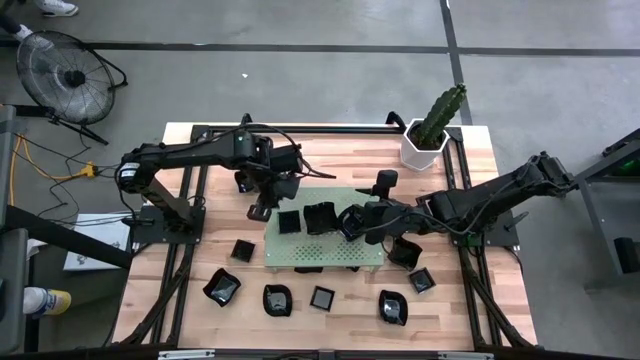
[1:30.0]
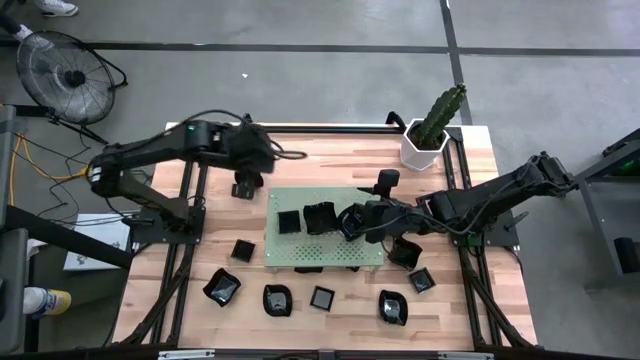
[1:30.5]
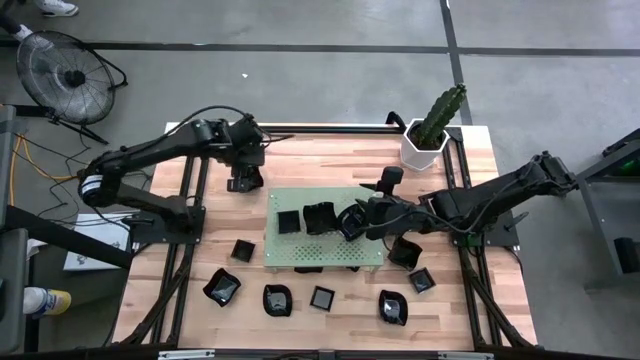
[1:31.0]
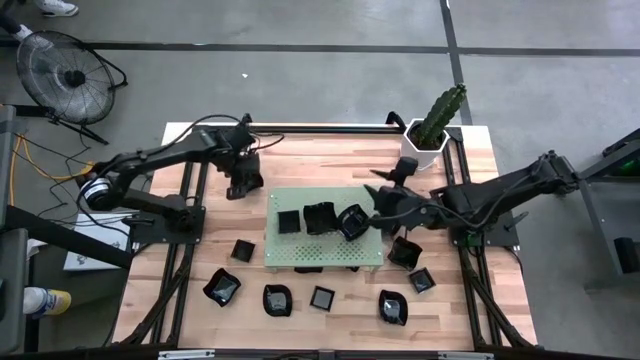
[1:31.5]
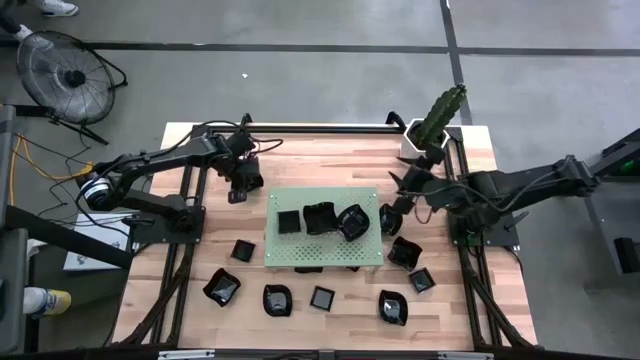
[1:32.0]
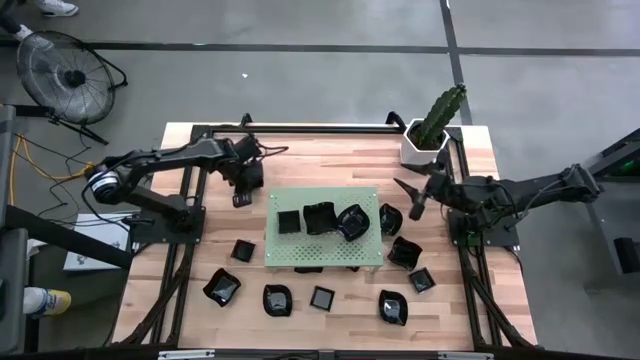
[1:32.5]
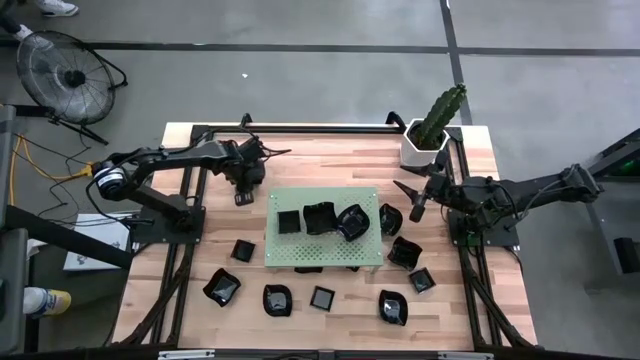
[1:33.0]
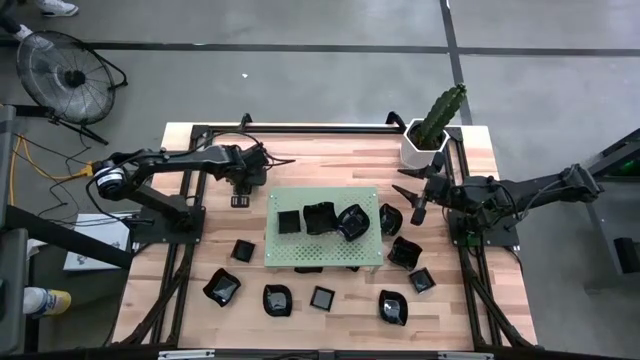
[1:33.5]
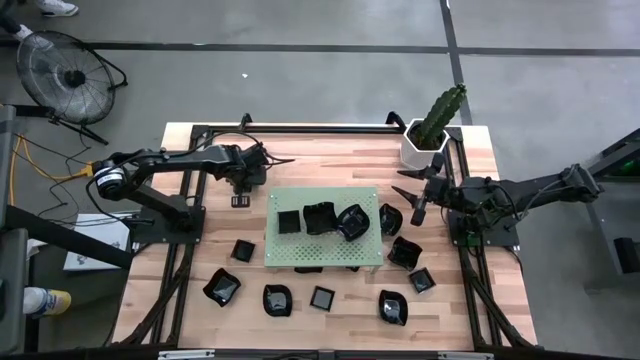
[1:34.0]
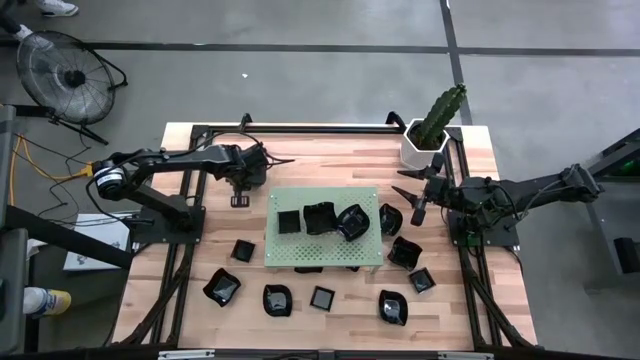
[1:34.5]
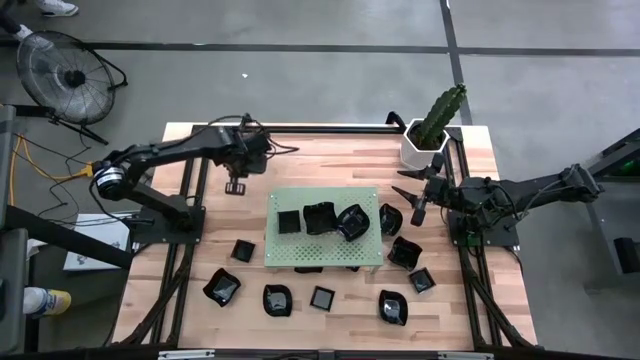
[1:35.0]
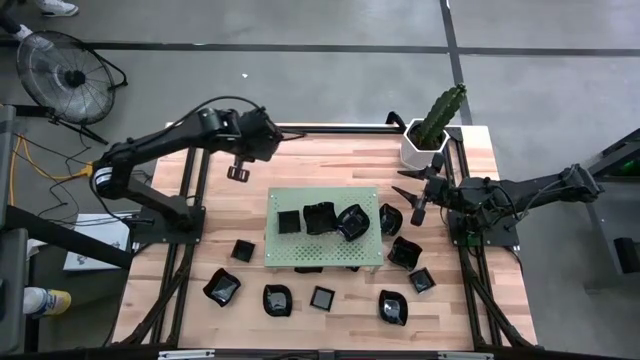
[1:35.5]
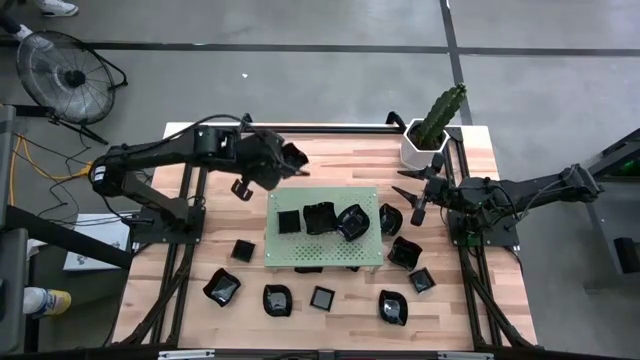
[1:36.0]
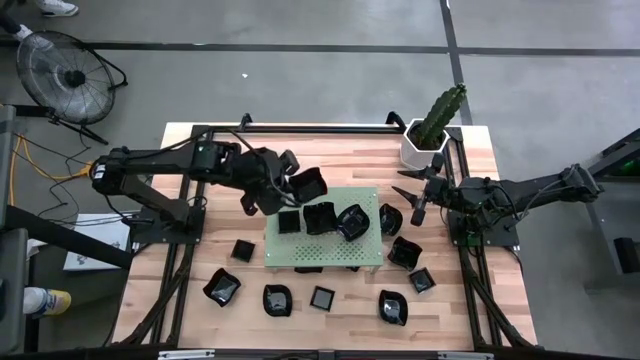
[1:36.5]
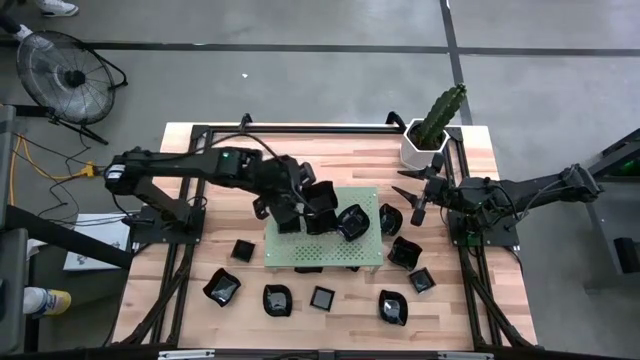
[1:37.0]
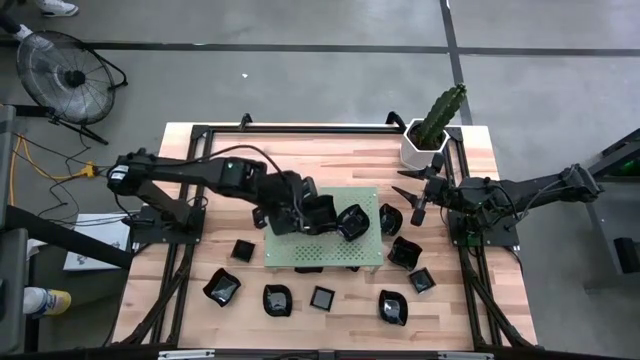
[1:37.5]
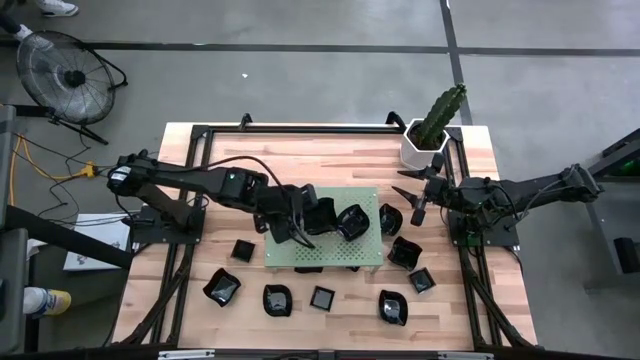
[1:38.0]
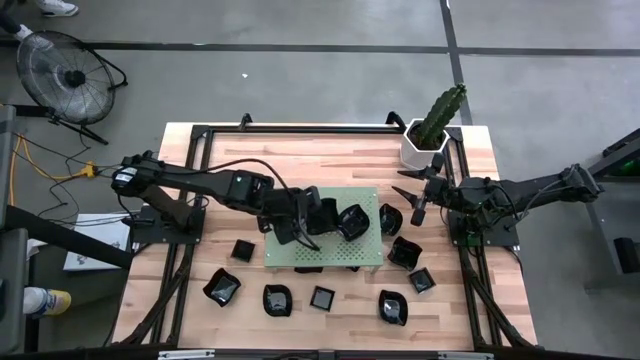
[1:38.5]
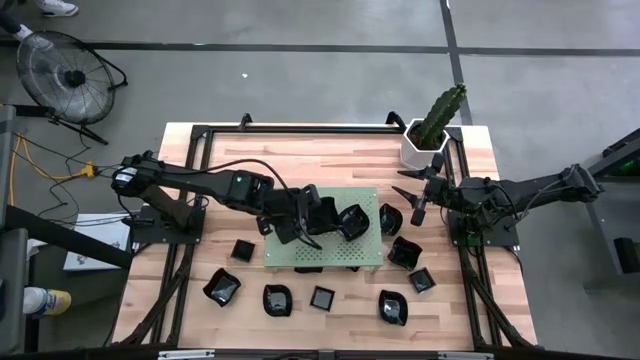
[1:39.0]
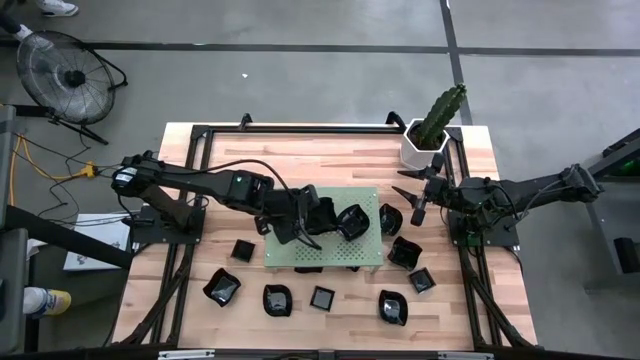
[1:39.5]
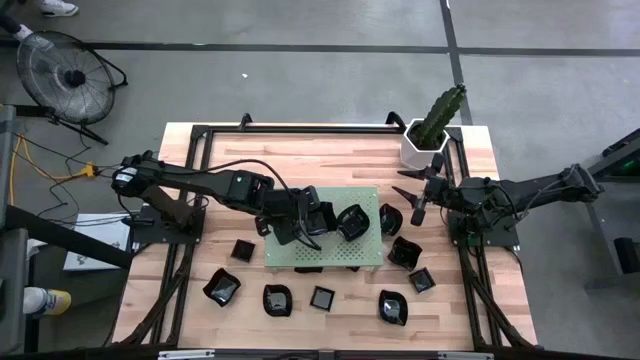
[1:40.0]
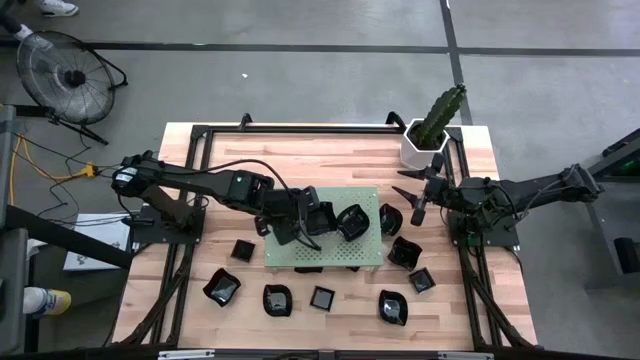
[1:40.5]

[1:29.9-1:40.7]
Task: Pick & Place Mini shaped plates
Stack the black wave square shaped bowl on top of the black wave square shaped bowl on the shelf

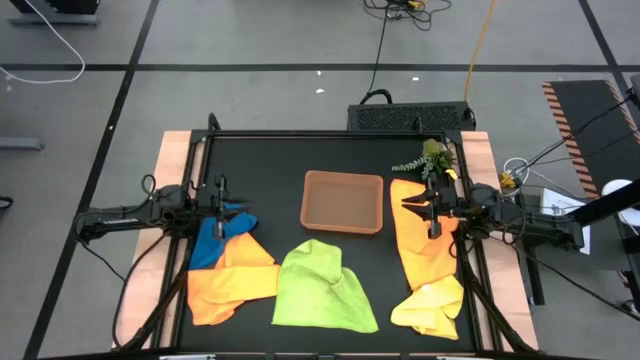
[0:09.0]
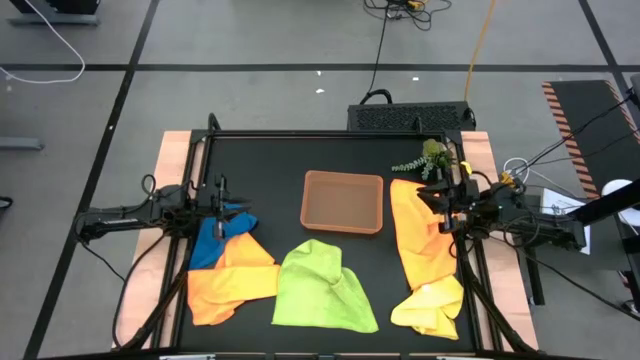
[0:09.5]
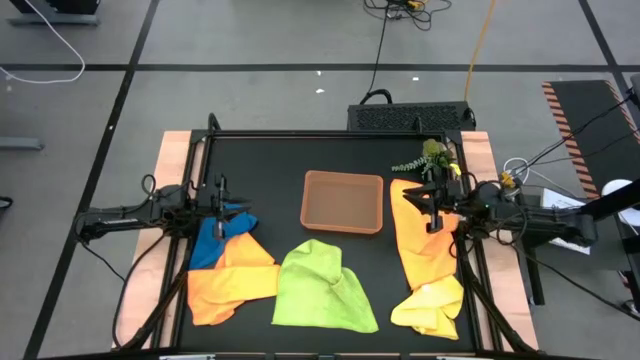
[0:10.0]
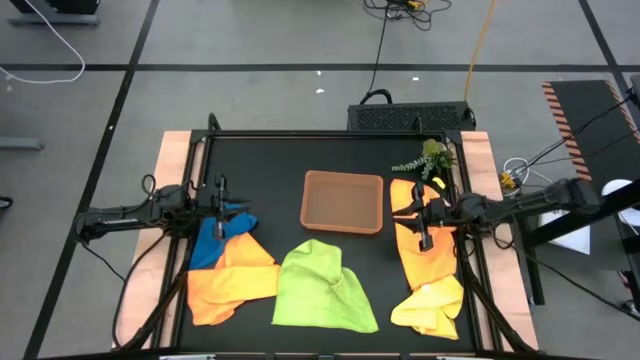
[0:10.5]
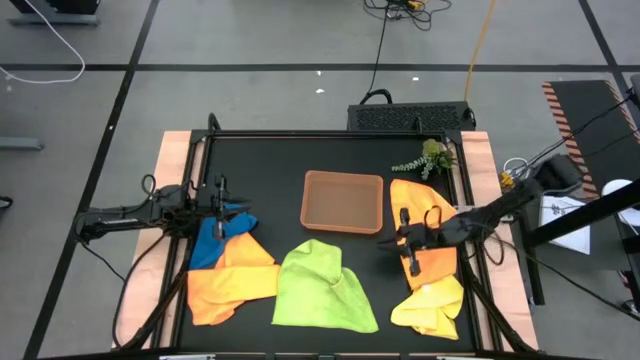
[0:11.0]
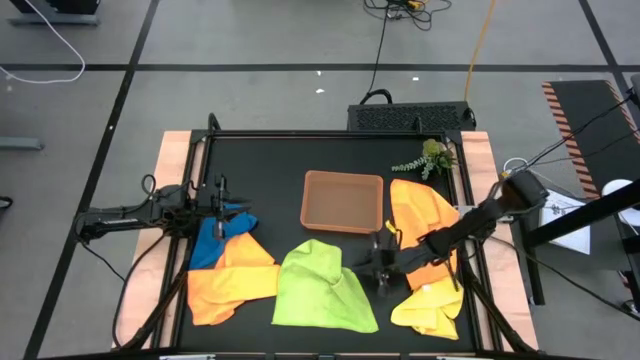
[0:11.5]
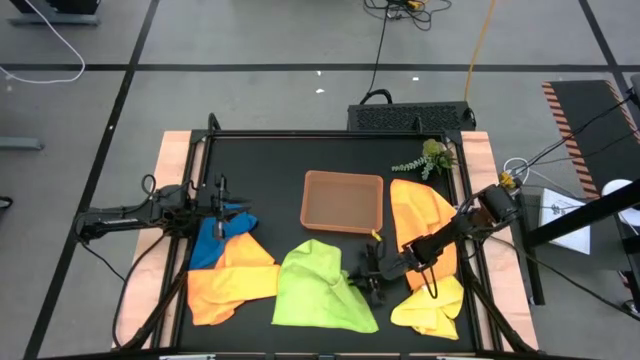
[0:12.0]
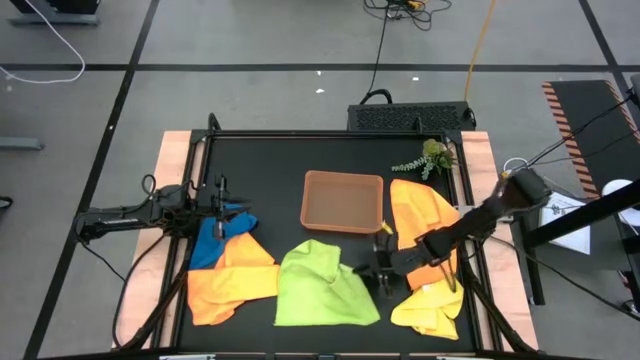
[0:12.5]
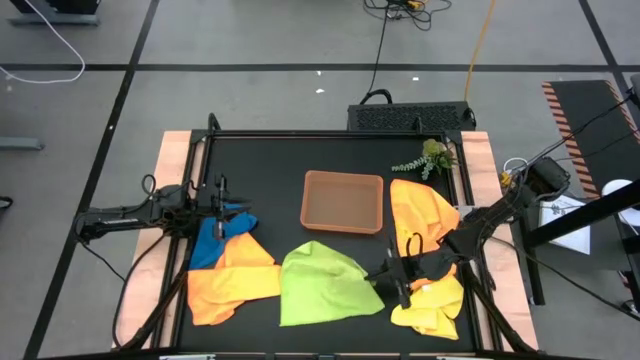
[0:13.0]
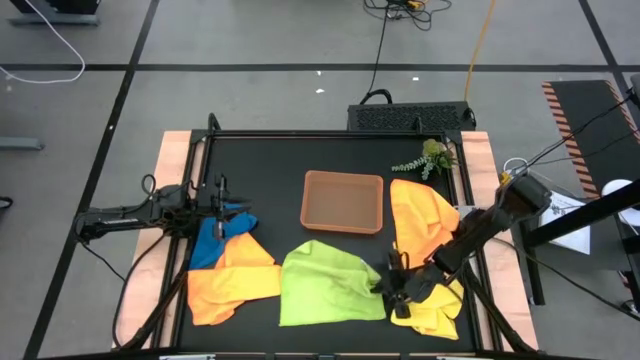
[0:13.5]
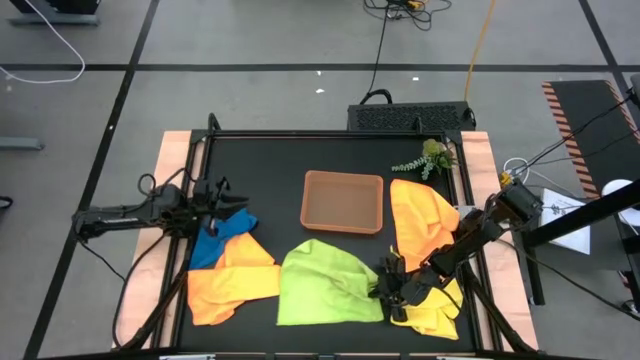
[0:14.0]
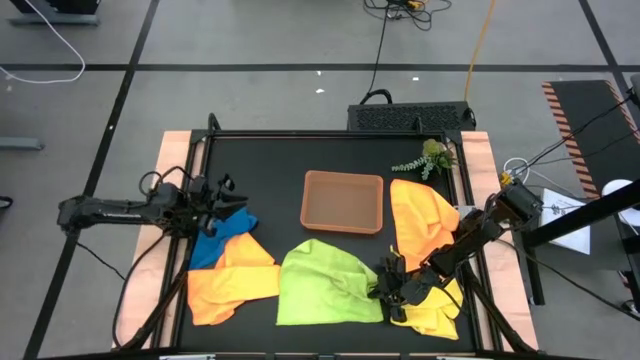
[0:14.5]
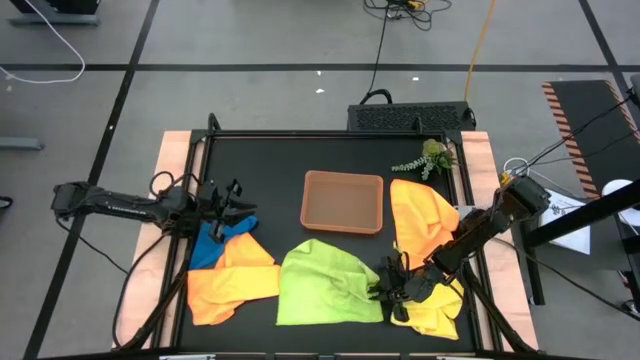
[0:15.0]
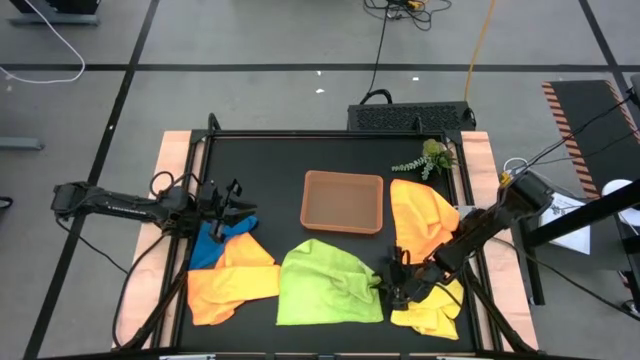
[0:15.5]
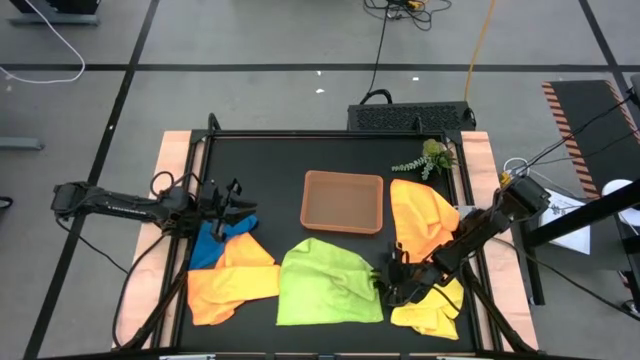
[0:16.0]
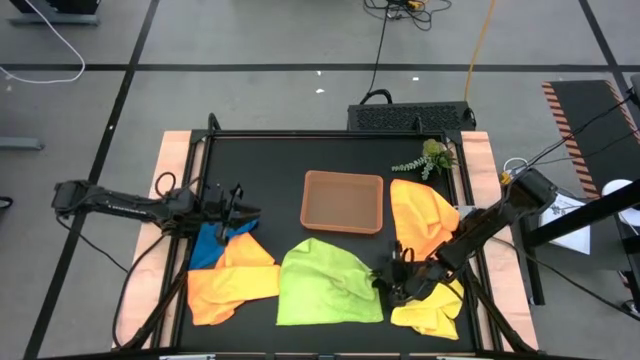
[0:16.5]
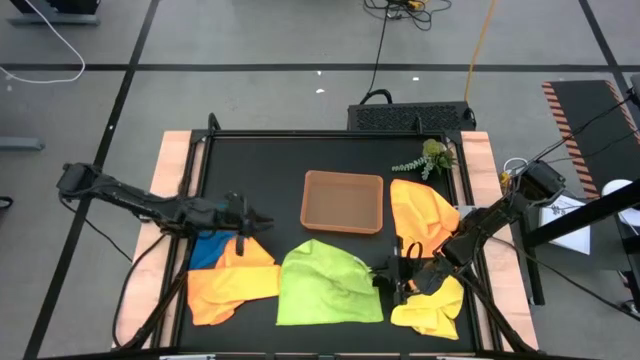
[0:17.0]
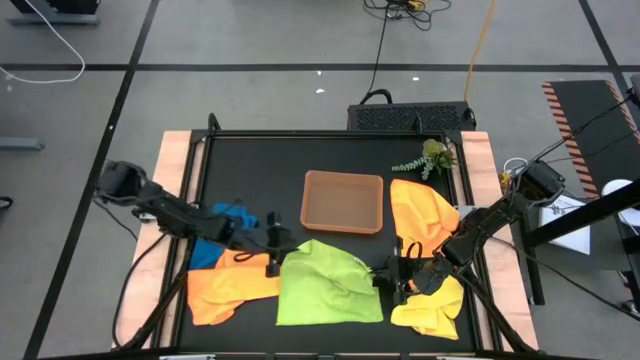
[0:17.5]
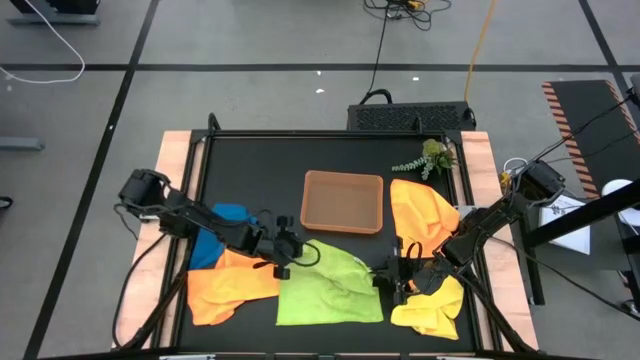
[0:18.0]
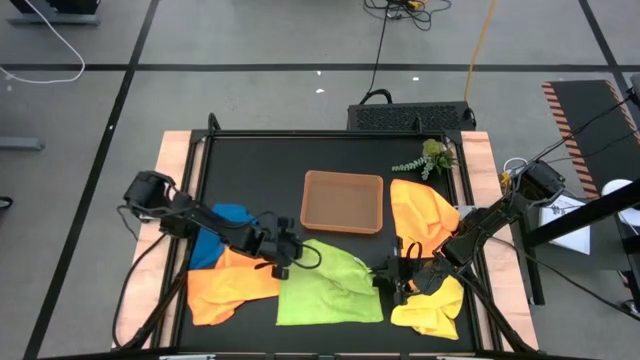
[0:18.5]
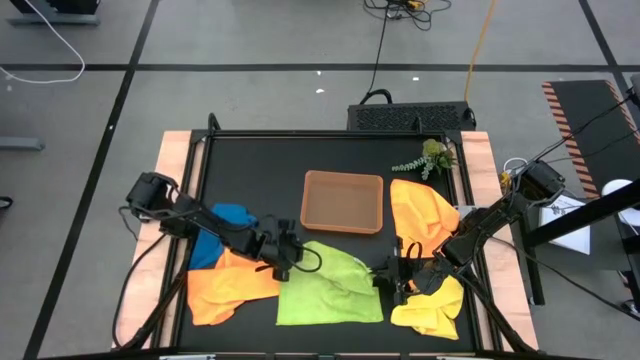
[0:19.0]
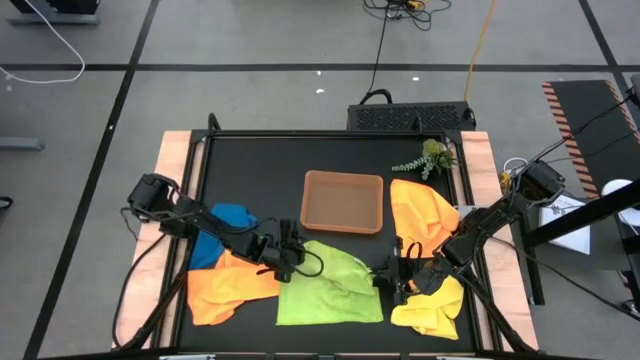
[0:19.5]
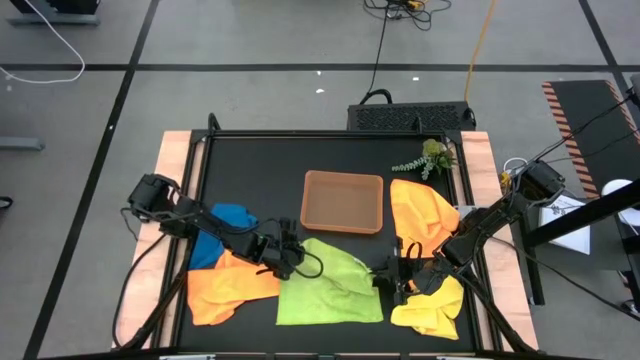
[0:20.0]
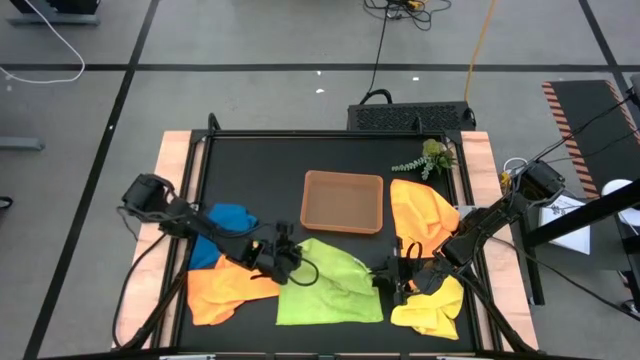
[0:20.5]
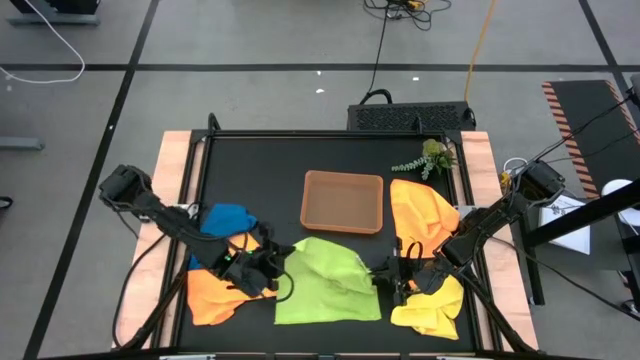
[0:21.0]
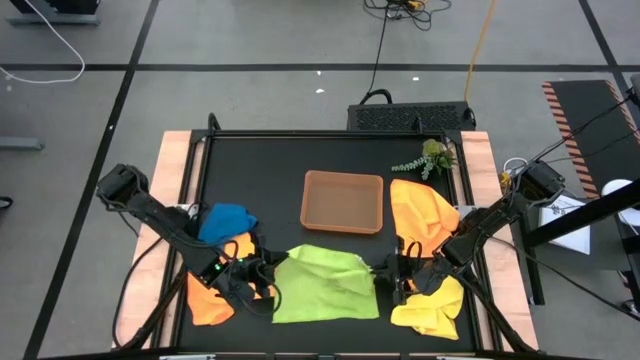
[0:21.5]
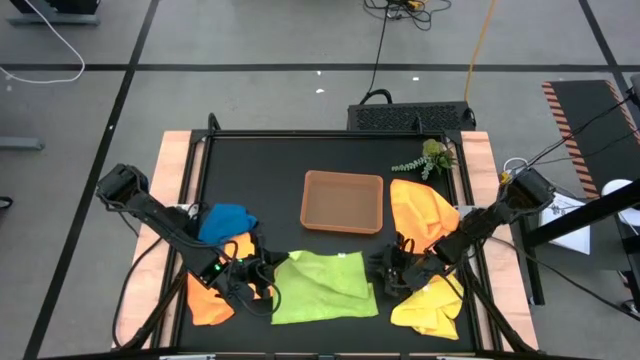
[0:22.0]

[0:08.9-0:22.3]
Task: Fold microfiber towels
Fold the green microfiber towel
